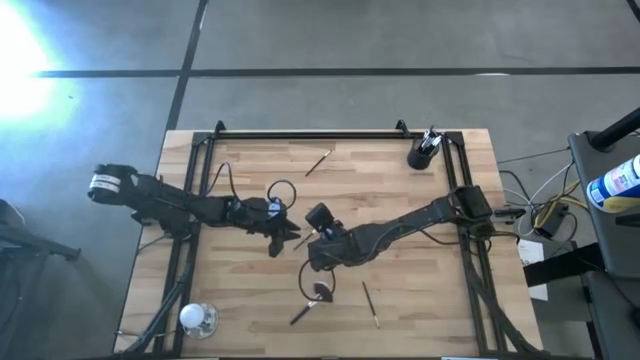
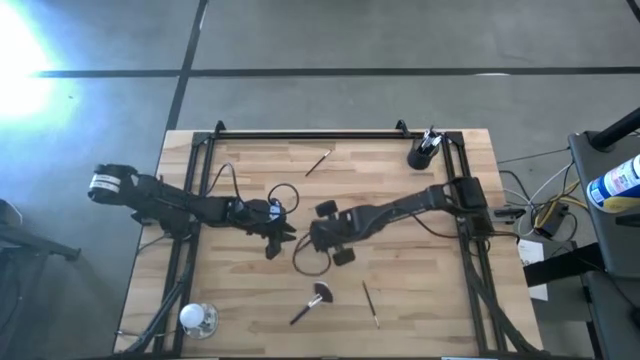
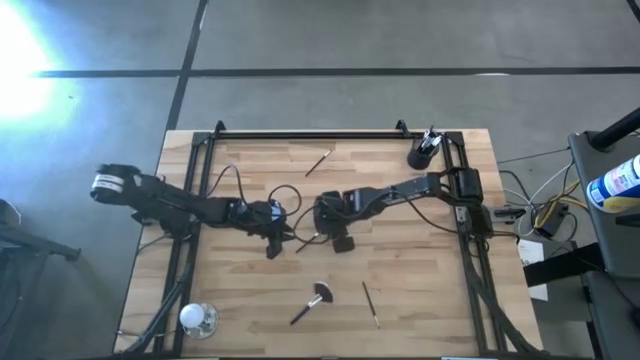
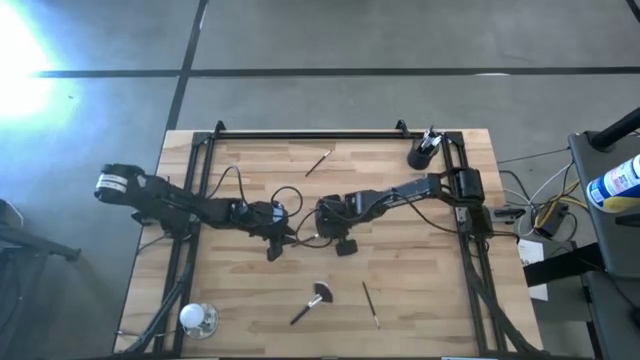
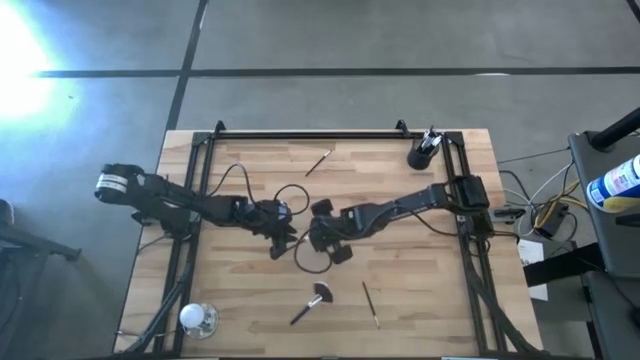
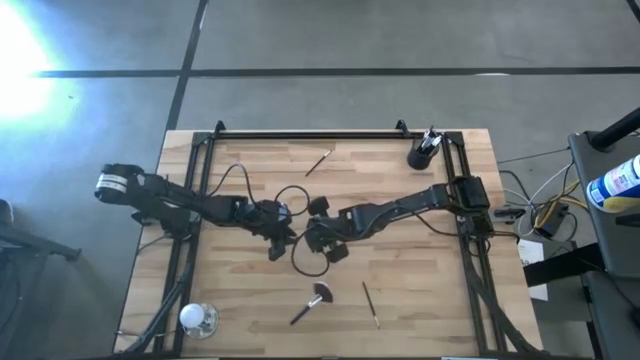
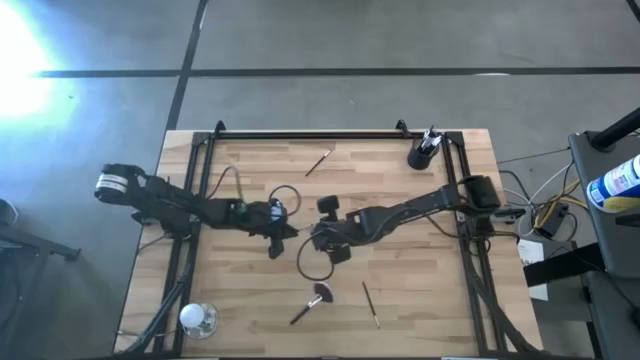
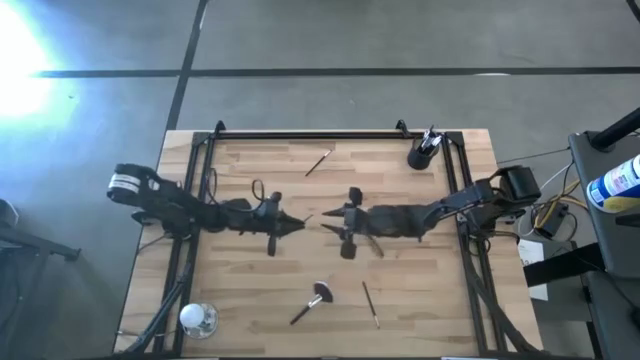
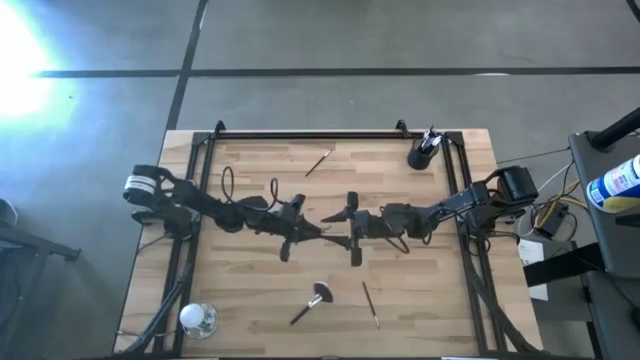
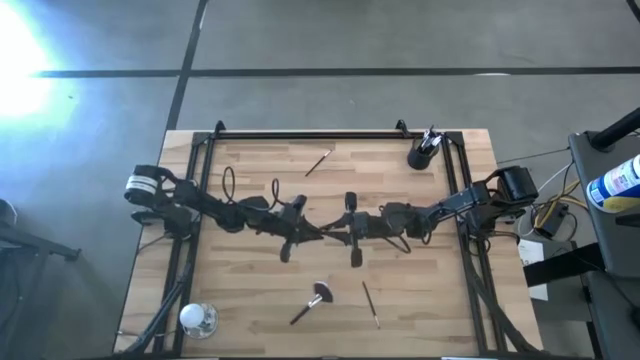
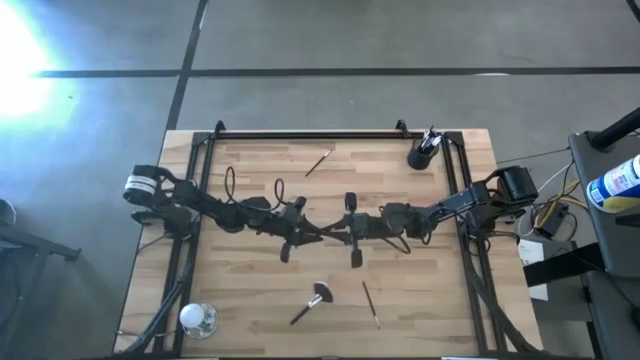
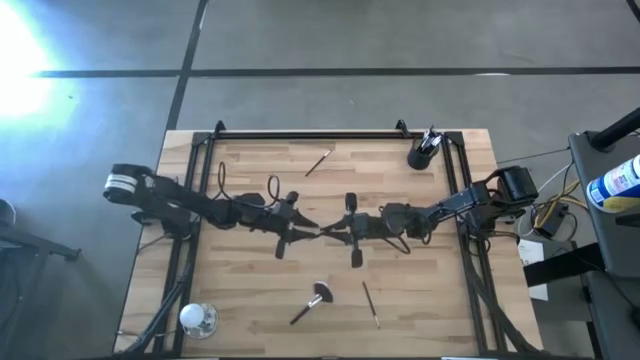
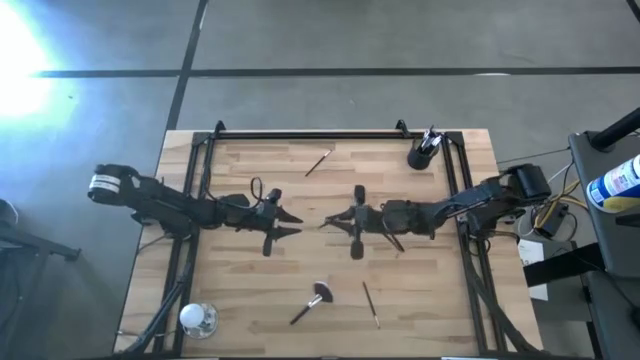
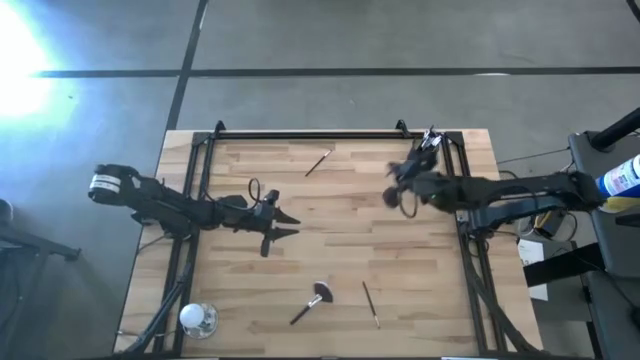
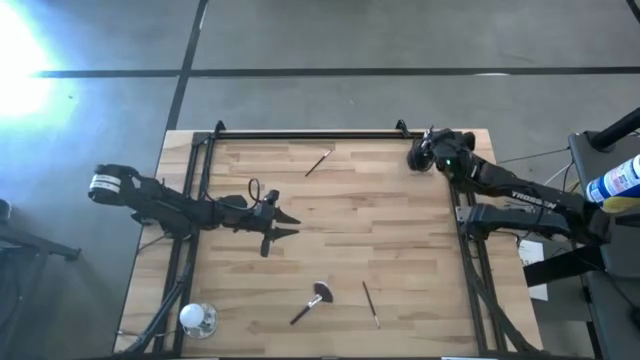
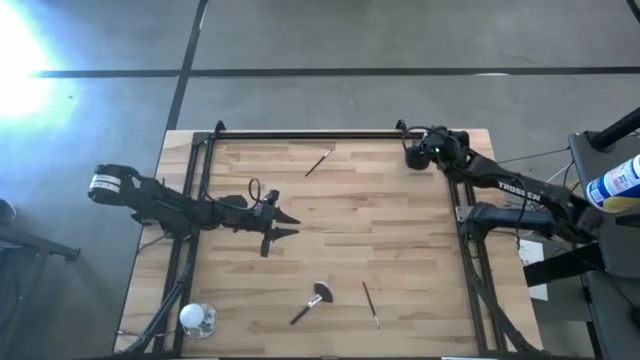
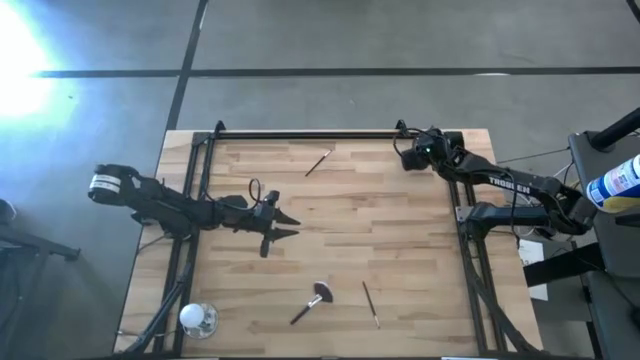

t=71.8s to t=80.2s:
Task: Put items in baskets/containers
Put the foundation brush into the pen holder

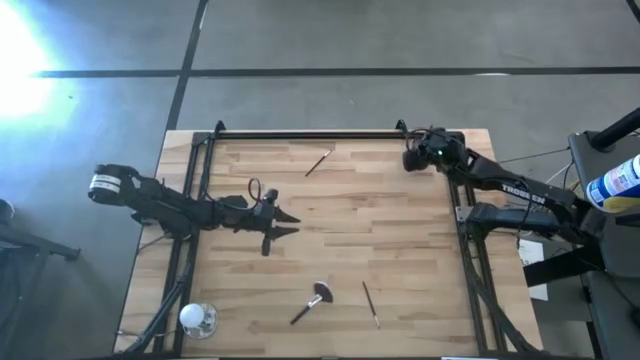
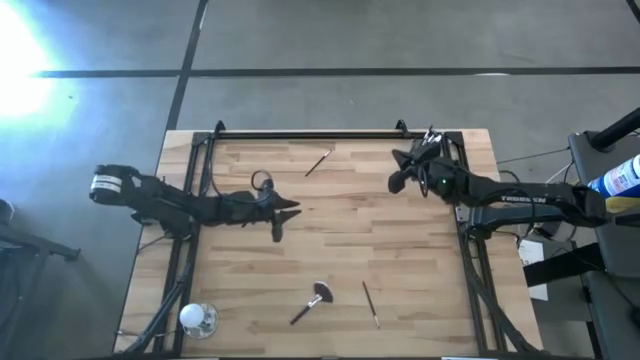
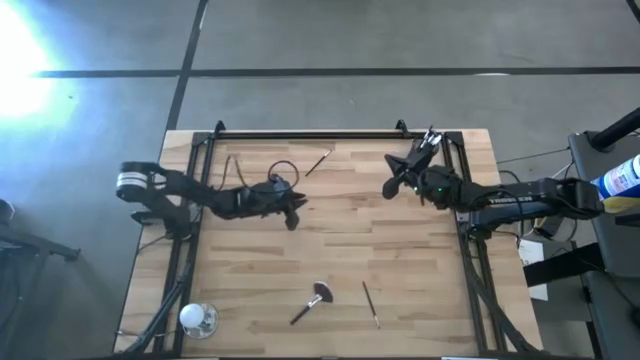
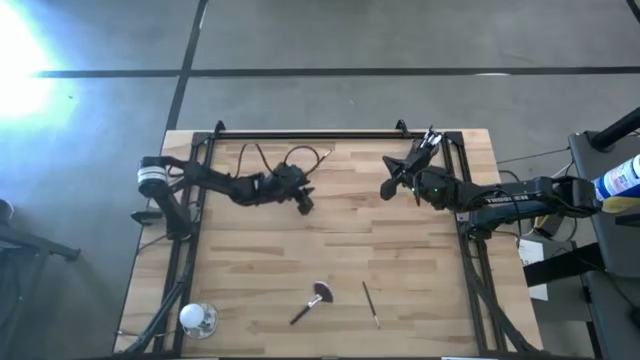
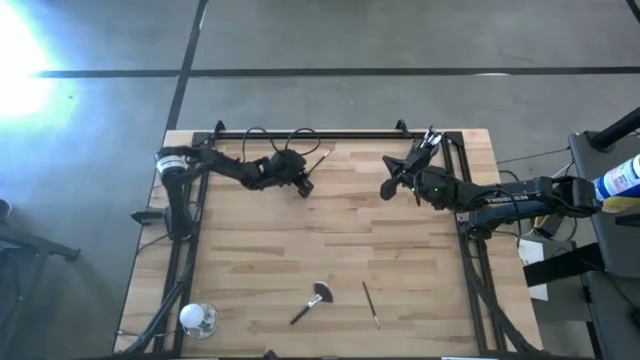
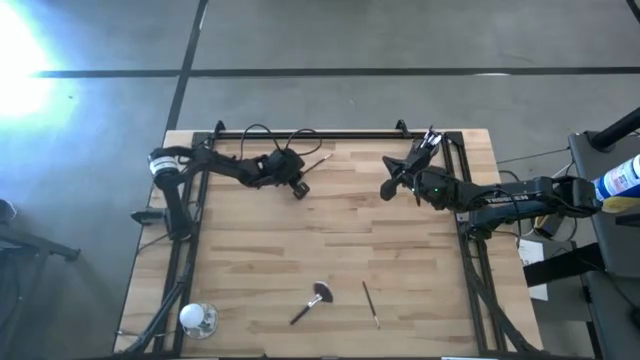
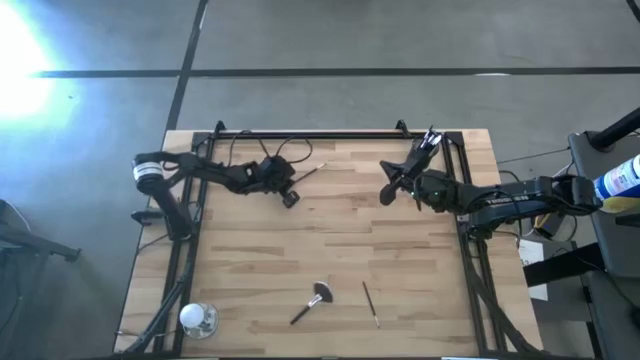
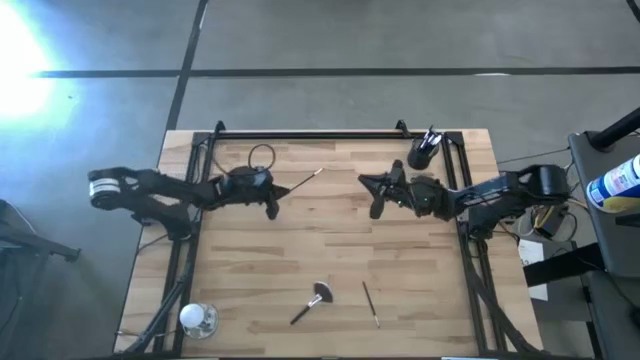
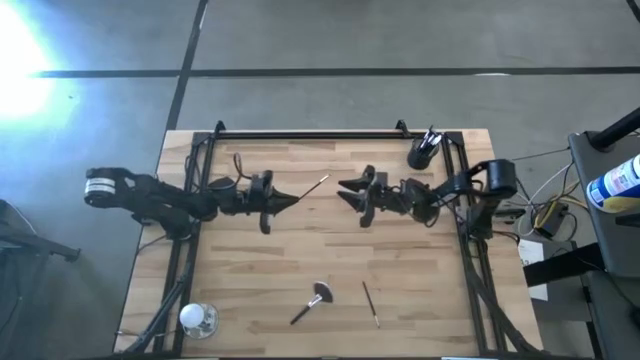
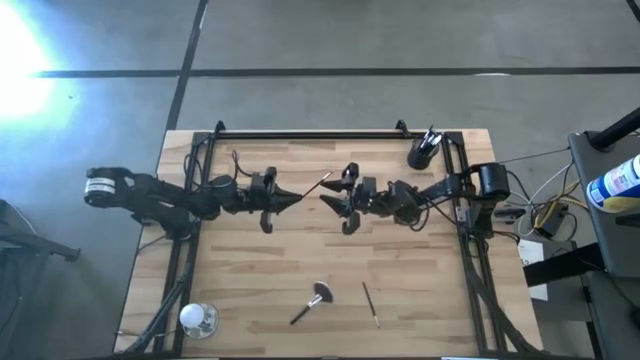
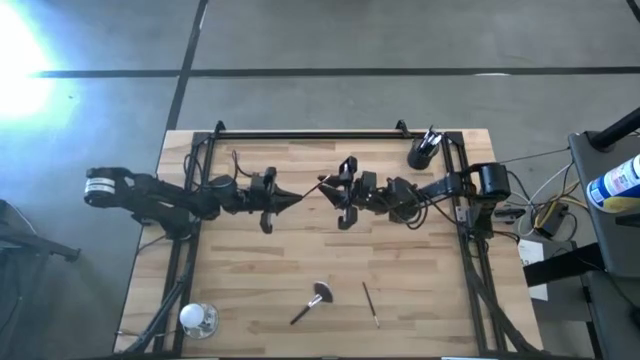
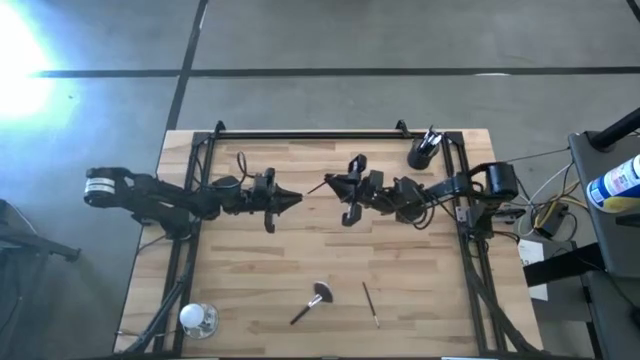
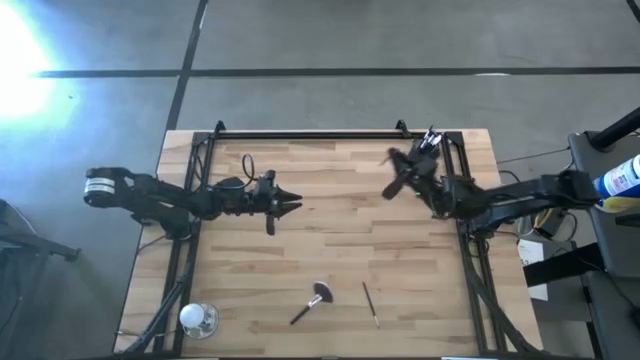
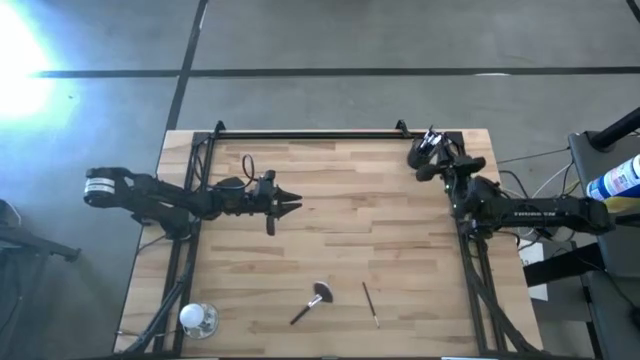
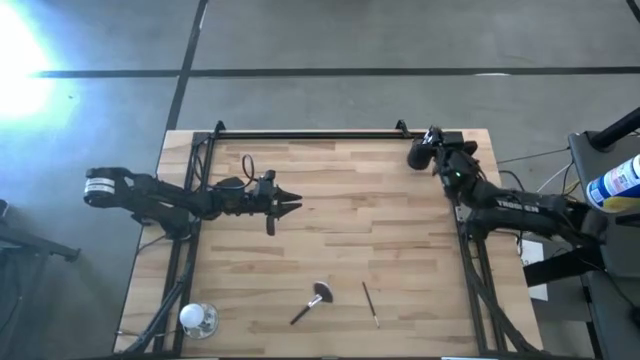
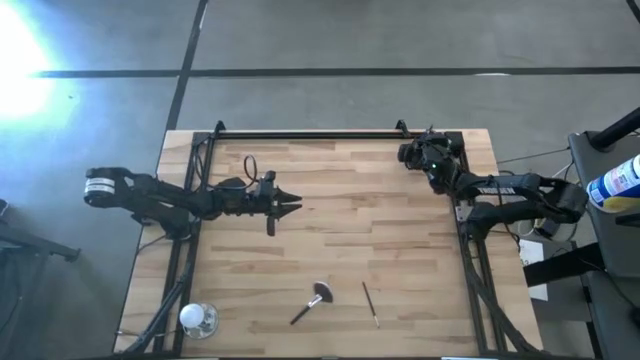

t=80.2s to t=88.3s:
Put the eyeshadow brush into the pen holder

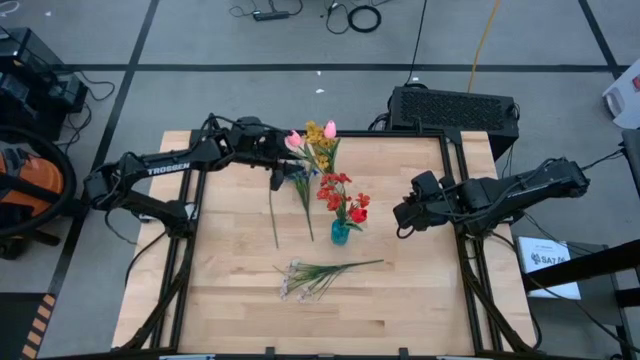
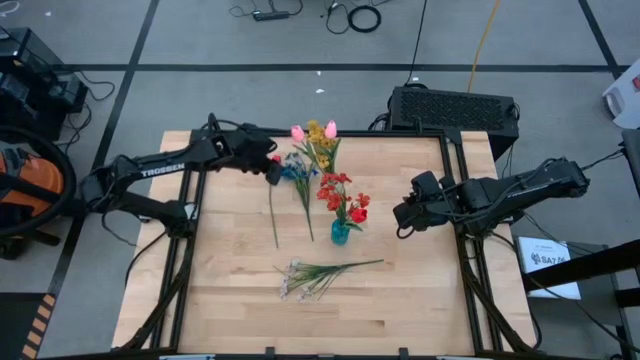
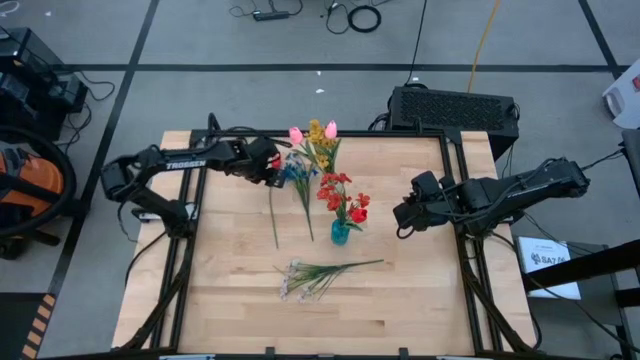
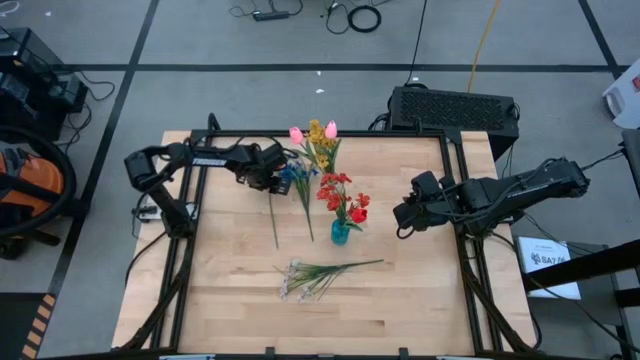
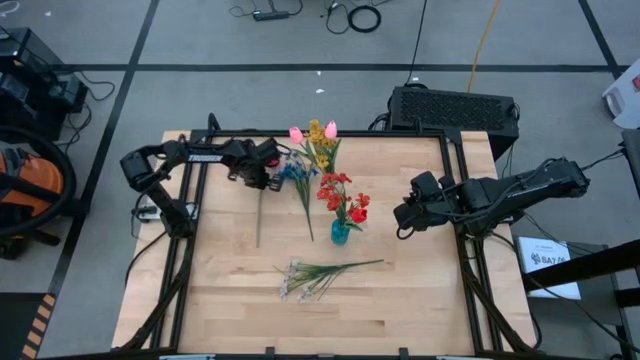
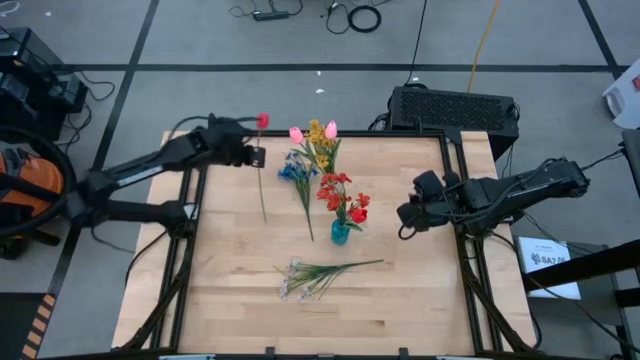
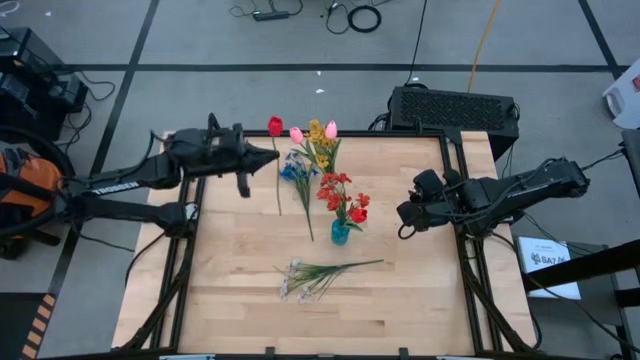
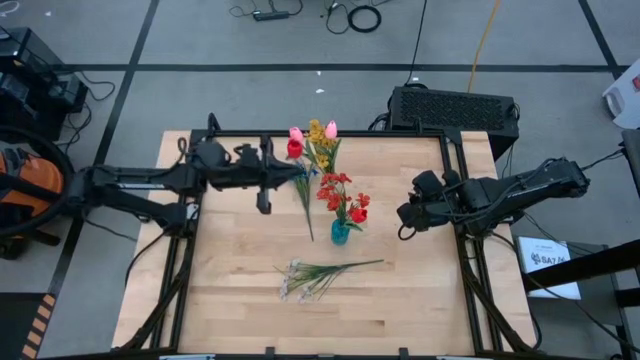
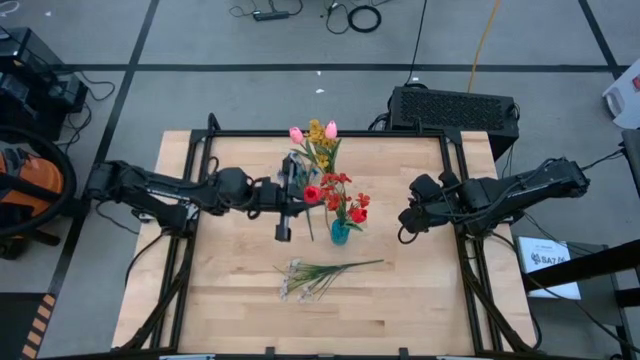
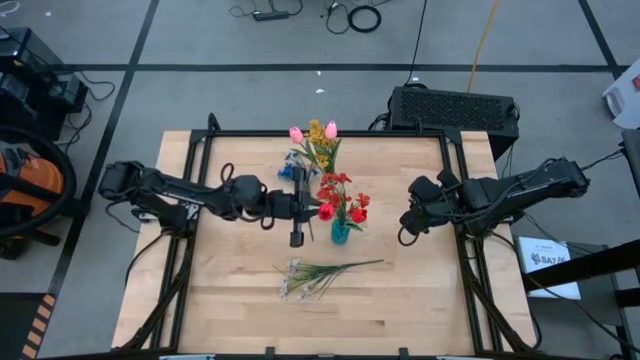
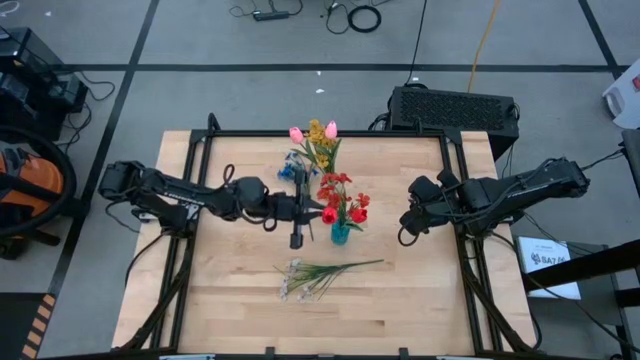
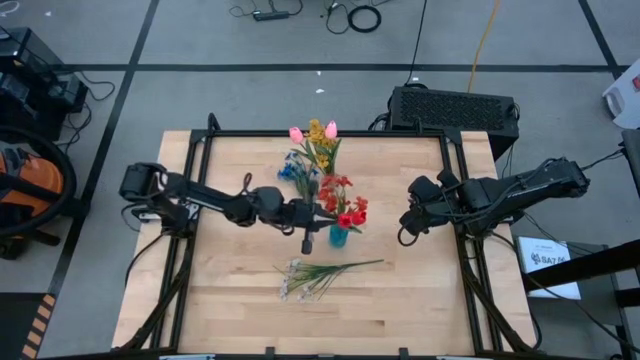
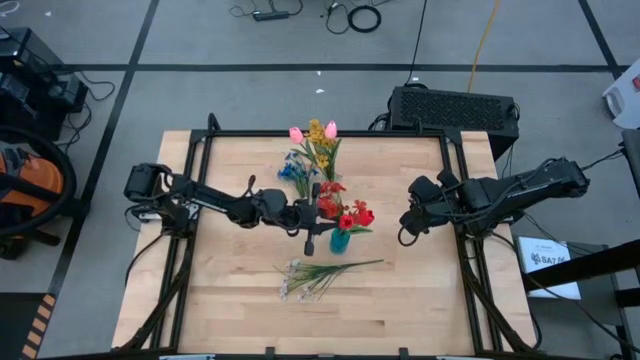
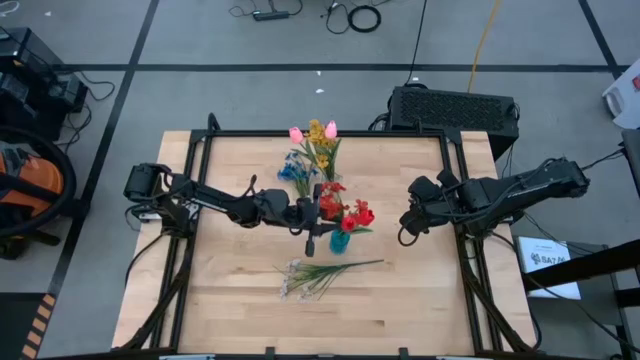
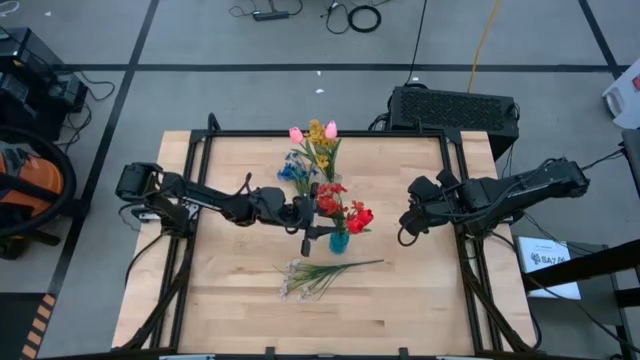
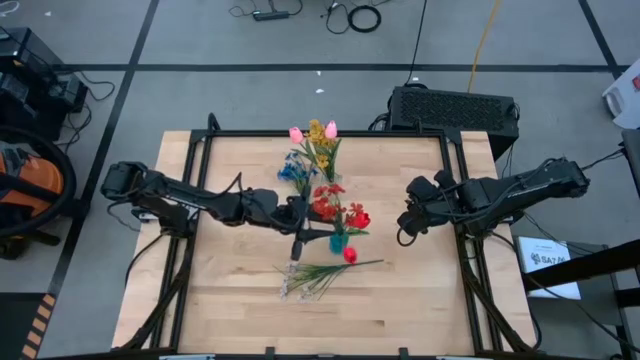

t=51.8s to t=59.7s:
Task: Sort flowers into vase by color
Put the red tulip into the blue vase
